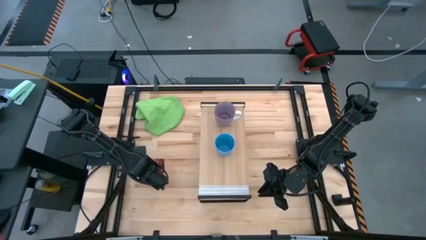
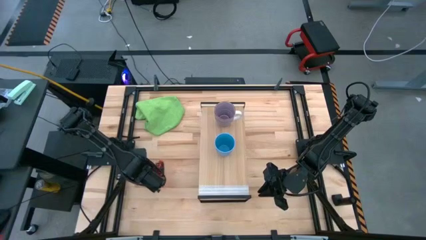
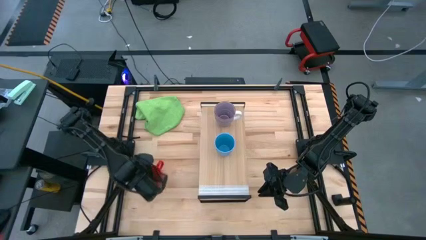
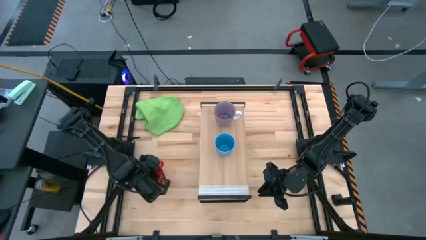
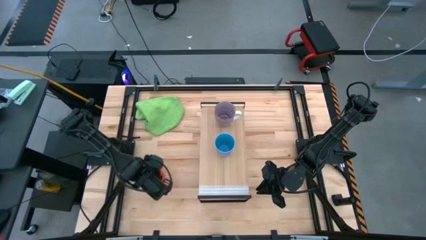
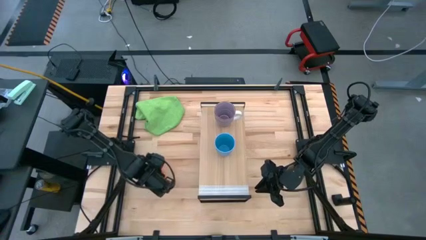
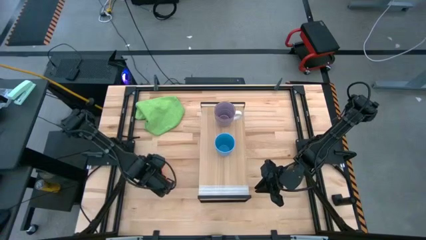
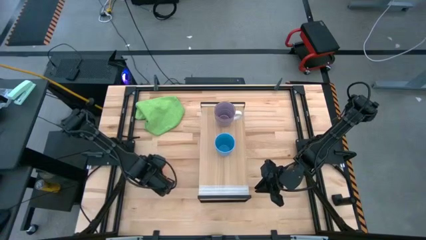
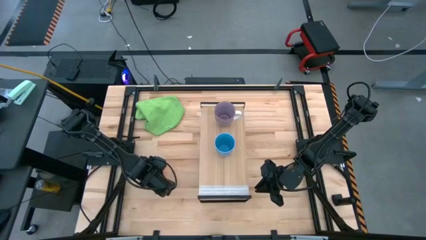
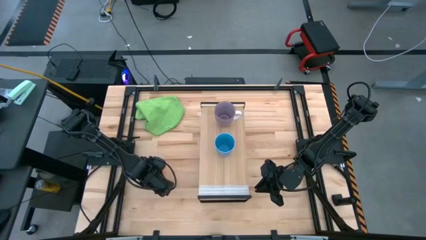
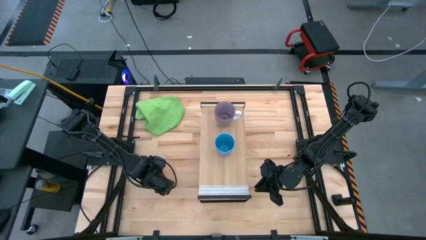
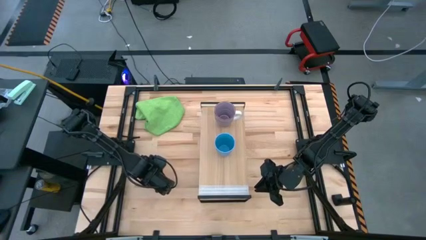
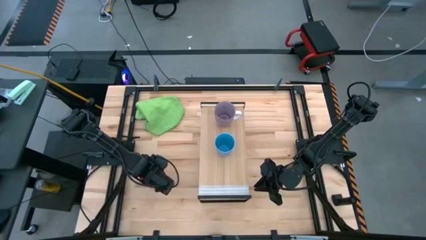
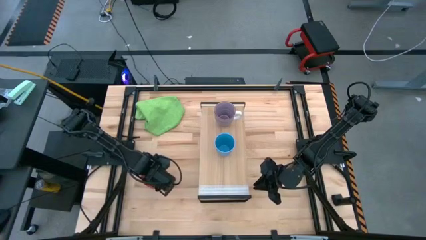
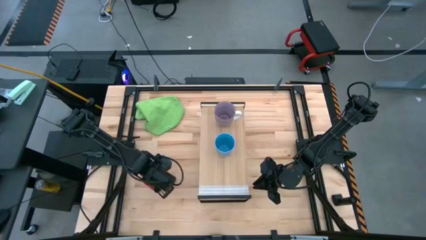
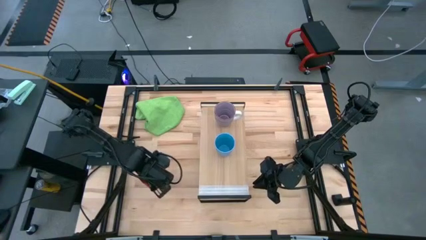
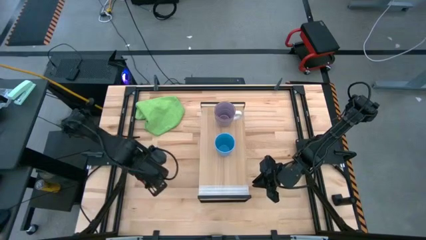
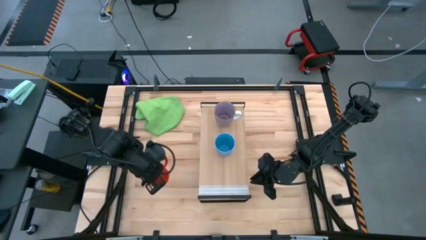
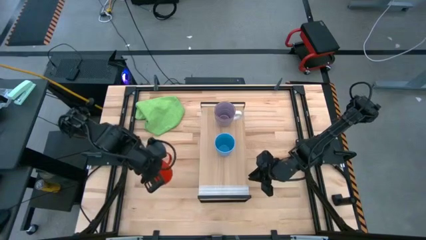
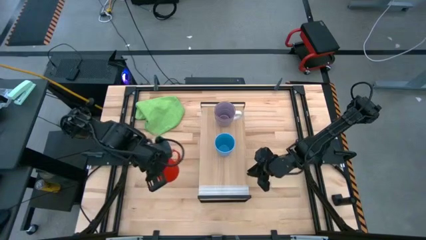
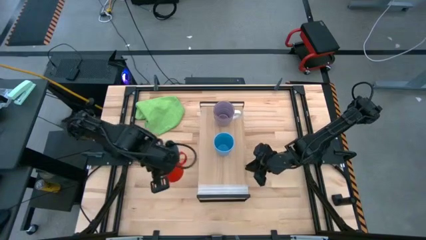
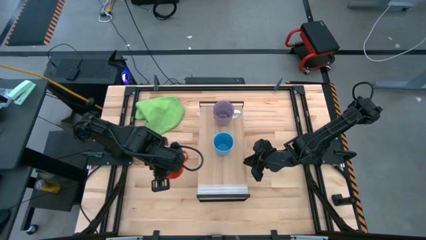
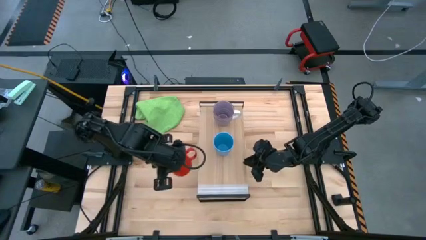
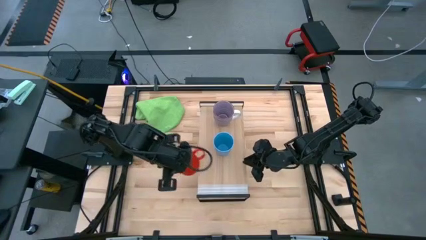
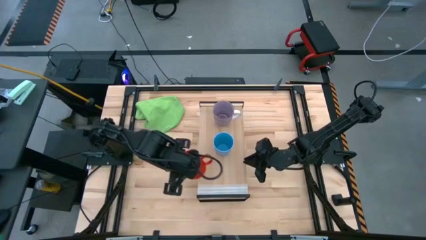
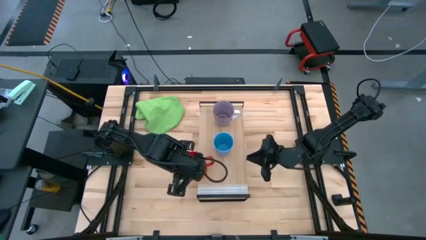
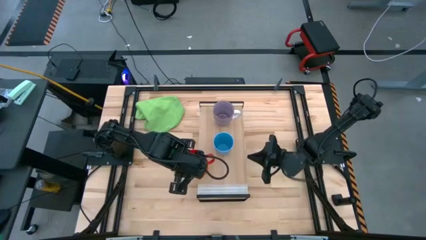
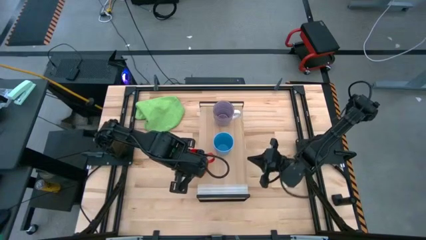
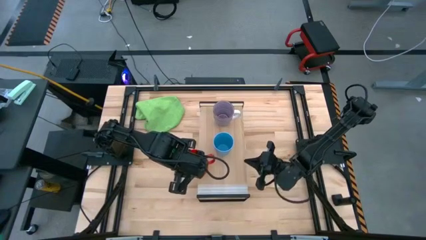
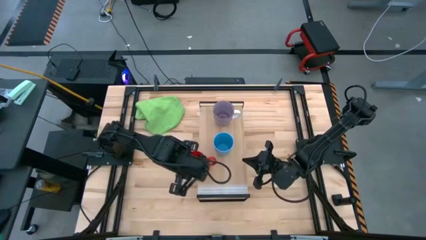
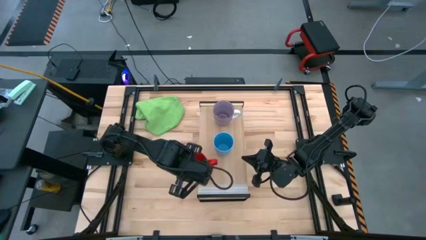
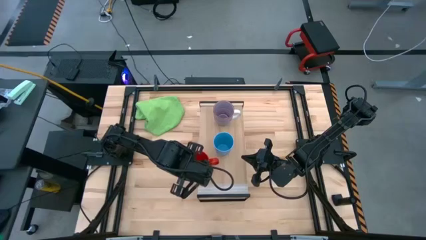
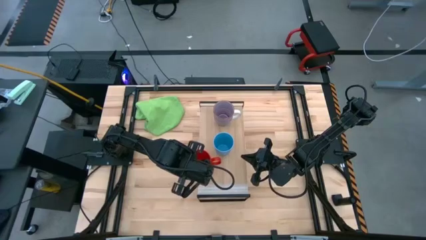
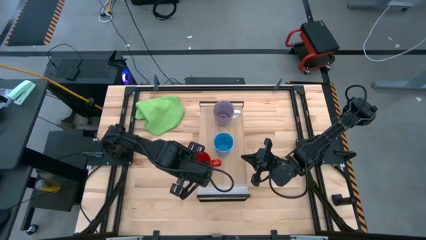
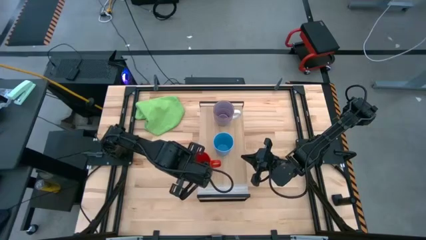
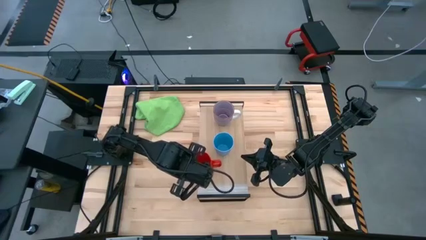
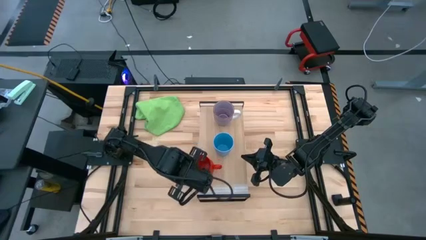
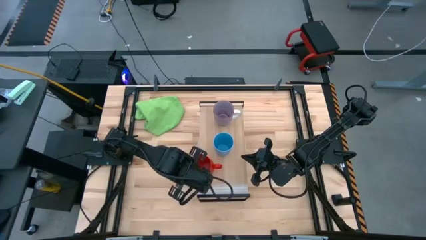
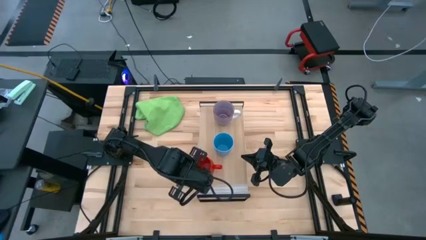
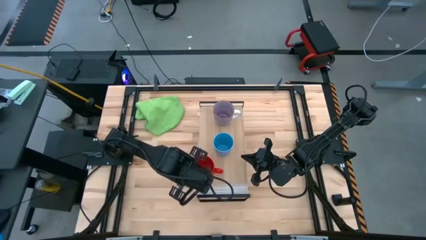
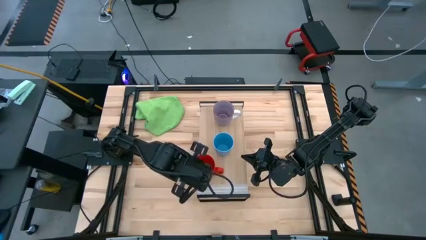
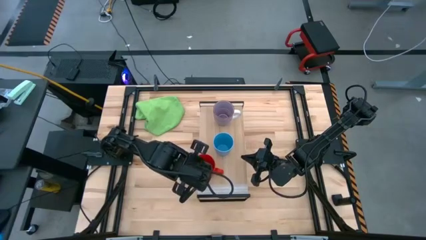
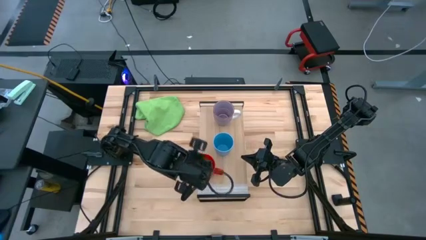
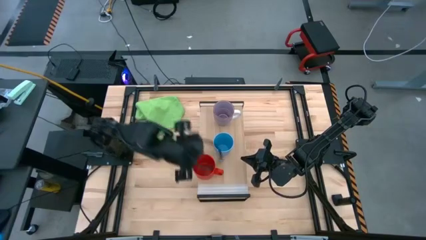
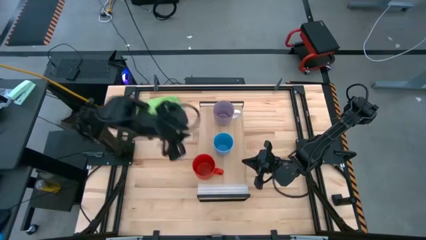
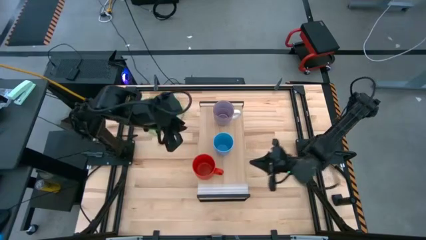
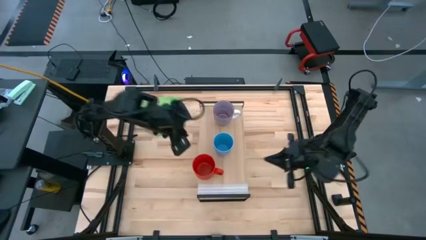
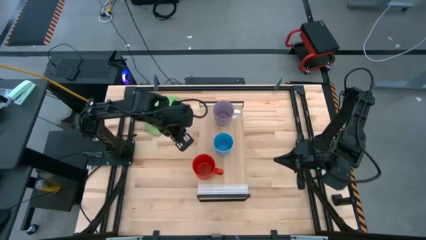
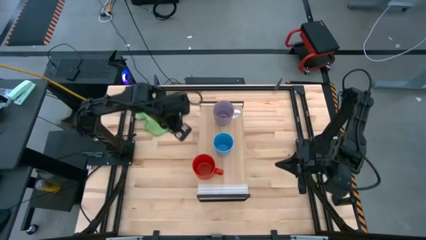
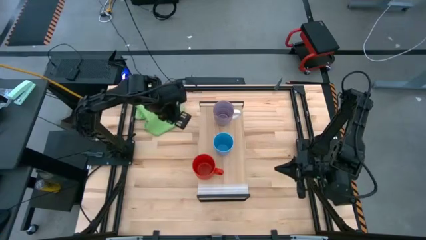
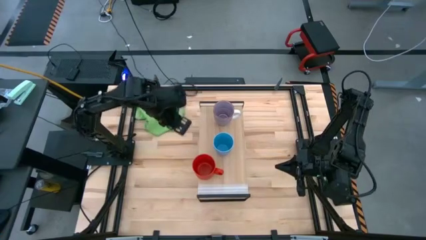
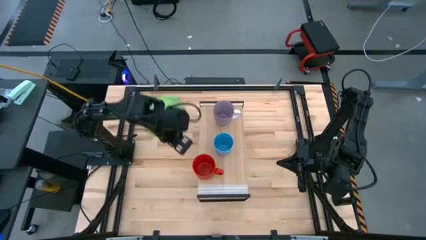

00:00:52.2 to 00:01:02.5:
Task: Stack small to large cups/mugs on shelf
Put the orange mug on the shelf
